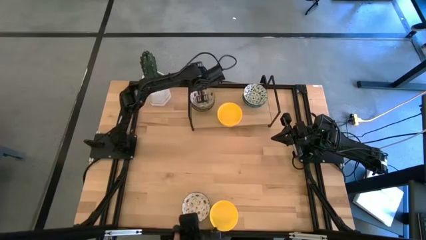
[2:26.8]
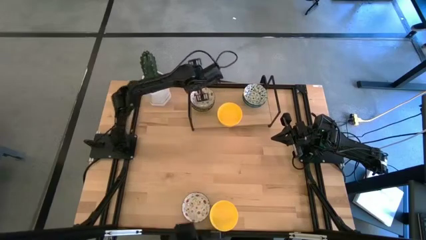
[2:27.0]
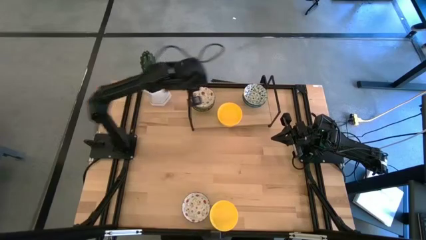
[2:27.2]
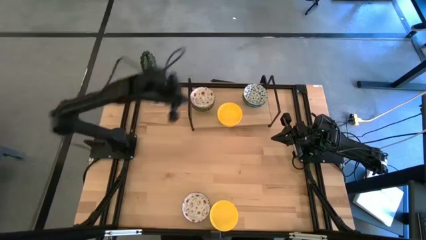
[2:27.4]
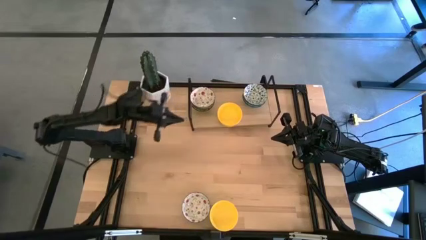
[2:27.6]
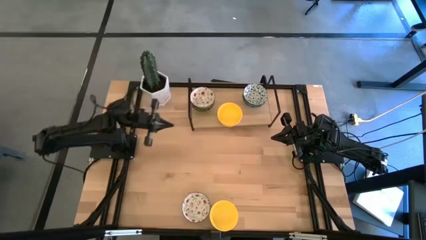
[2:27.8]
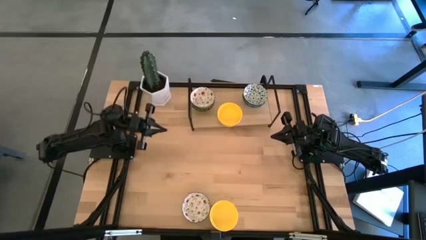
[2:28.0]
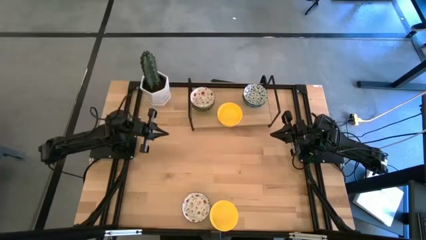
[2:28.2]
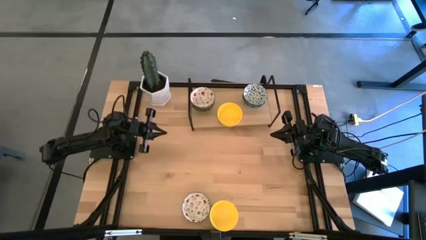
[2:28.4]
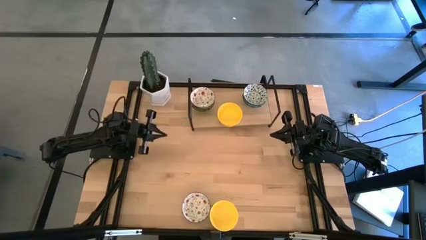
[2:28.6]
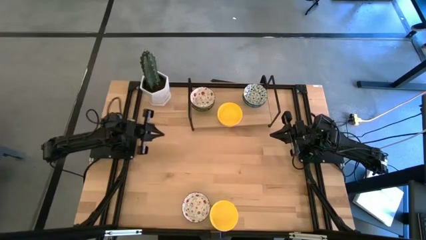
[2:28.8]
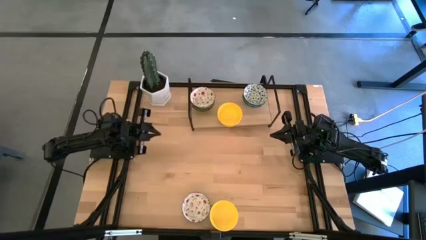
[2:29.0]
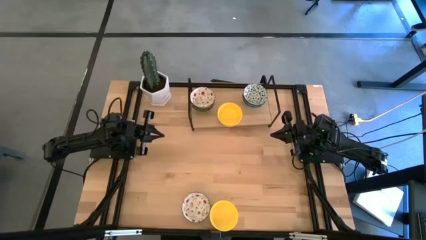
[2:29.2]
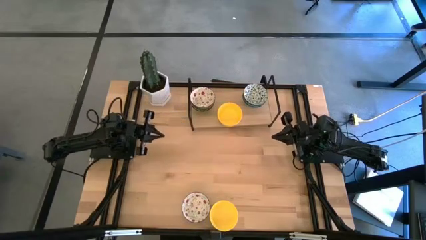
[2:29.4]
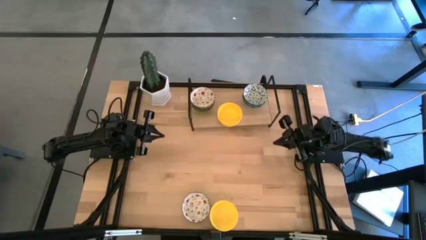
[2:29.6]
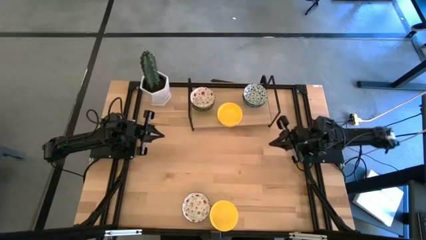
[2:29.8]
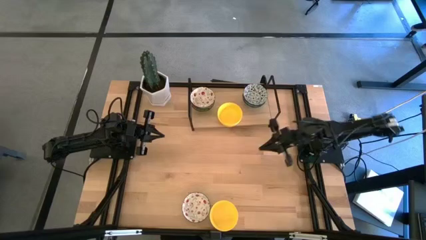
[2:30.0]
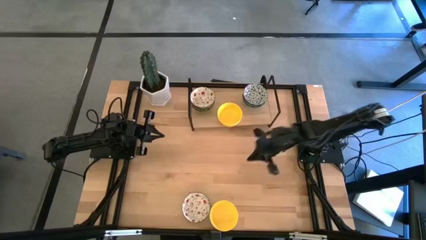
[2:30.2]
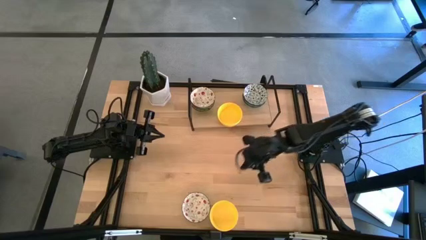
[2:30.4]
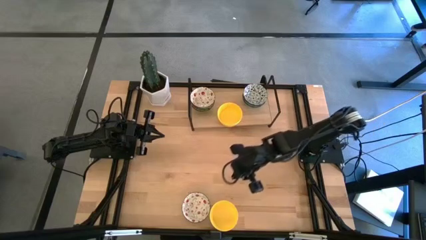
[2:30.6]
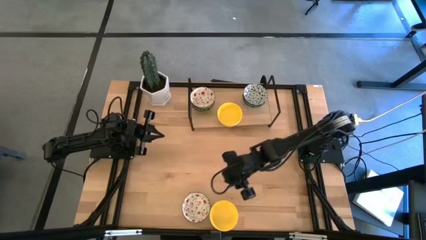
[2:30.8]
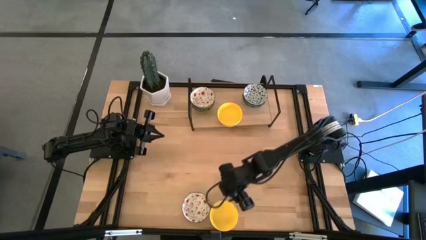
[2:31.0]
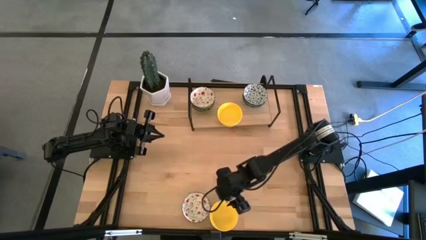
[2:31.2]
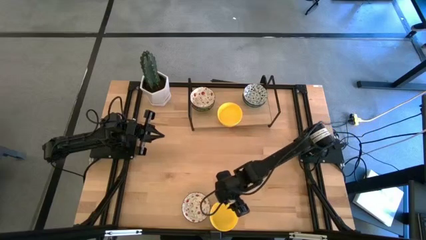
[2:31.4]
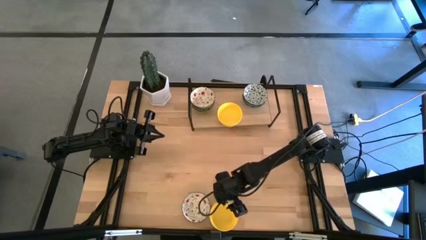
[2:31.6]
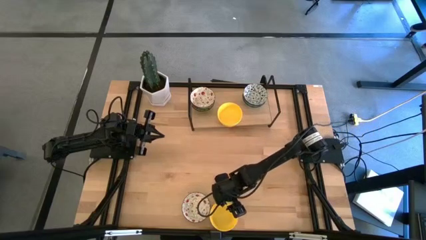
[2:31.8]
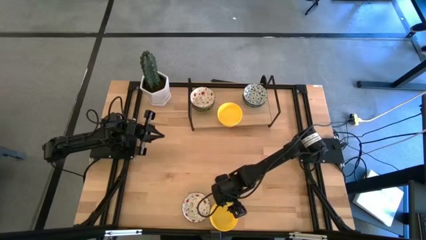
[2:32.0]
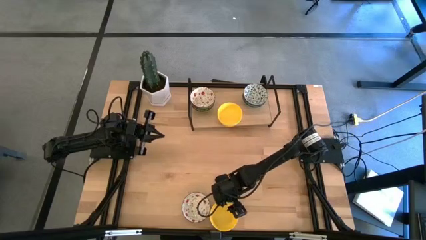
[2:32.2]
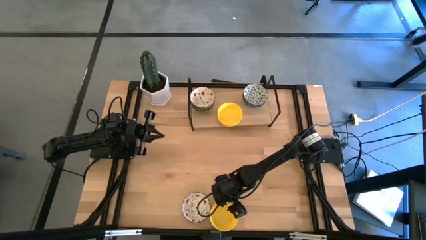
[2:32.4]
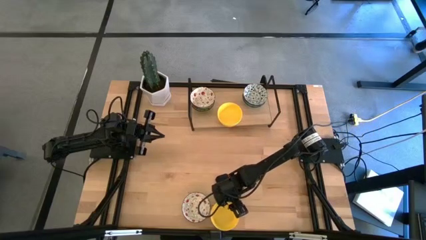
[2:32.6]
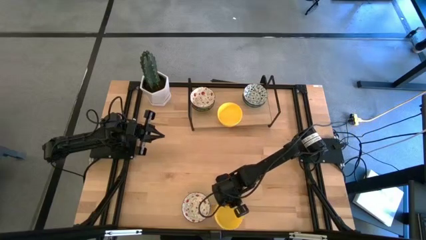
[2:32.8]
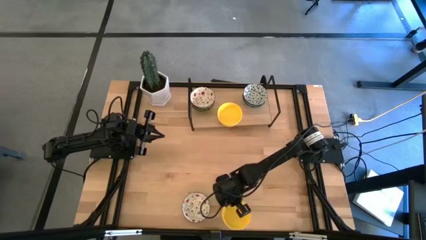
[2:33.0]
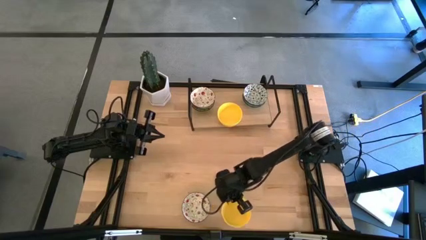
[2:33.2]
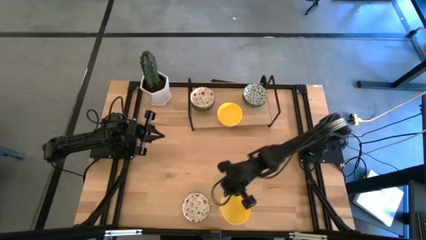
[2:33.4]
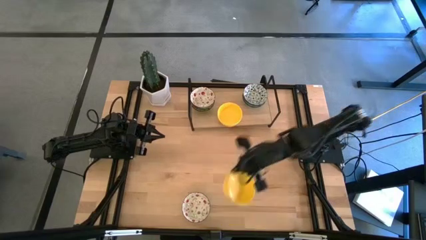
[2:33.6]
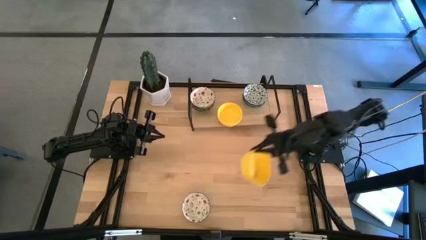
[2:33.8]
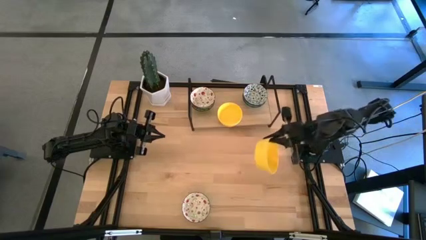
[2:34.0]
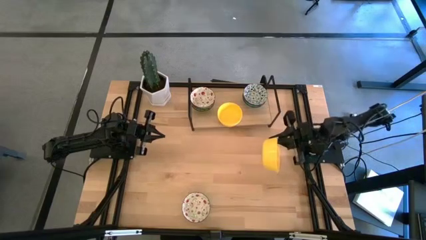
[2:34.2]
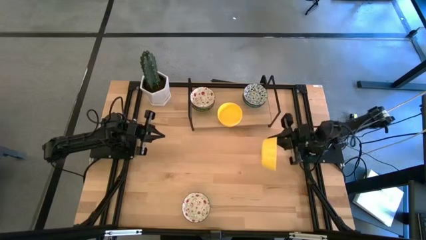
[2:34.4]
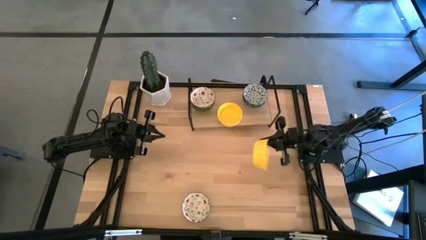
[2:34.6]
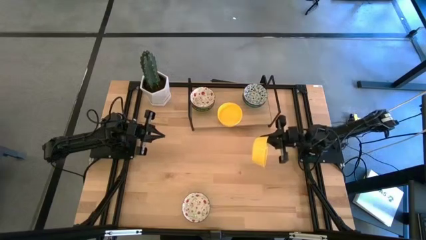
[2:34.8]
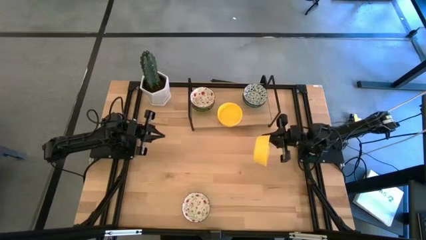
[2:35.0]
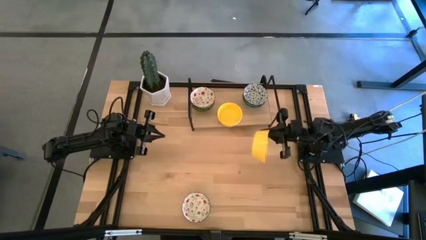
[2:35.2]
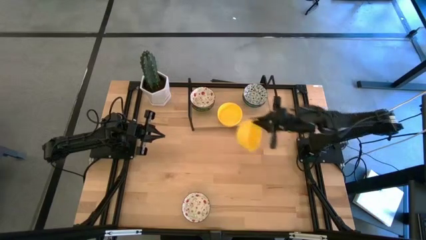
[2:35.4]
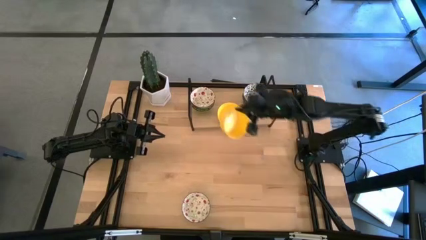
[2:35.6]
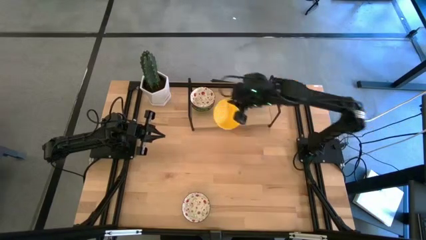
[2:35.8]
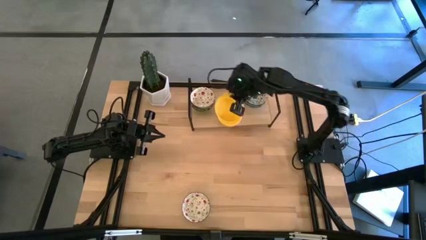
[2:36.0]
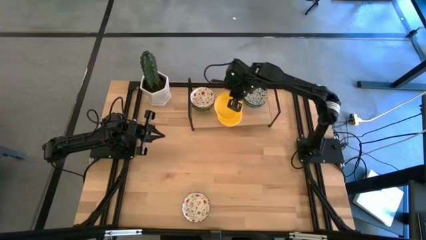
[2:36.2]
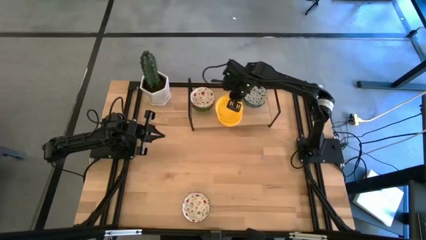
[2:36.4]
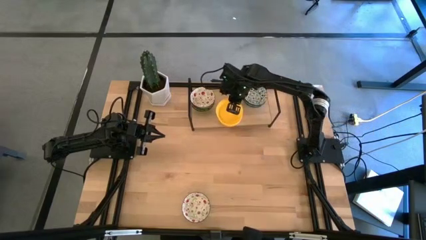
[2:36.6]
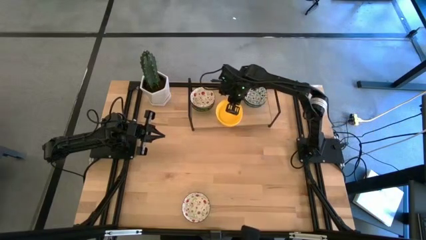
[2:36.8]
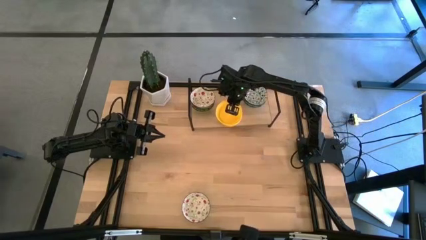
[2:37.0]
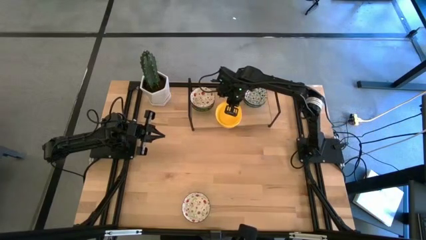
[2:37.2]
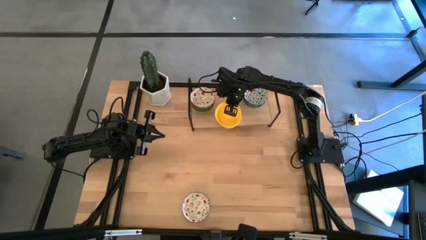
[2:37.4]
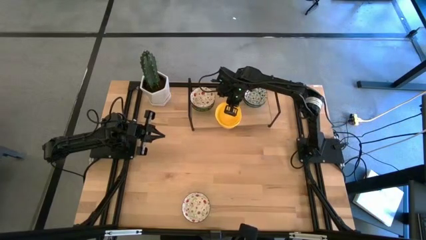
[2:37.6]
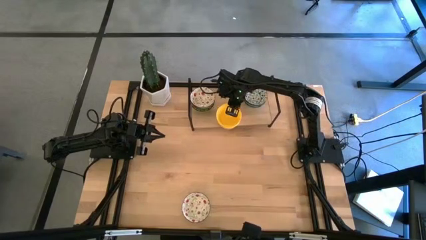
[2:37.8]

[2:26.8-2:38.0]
Task: Pick & Place Mini bowls
Stack the yellow bowl on the yellow bowl on the shelf
